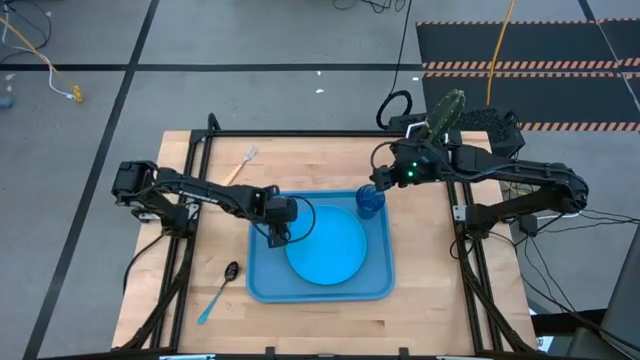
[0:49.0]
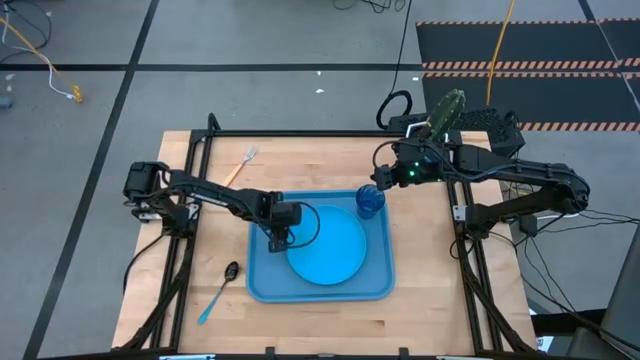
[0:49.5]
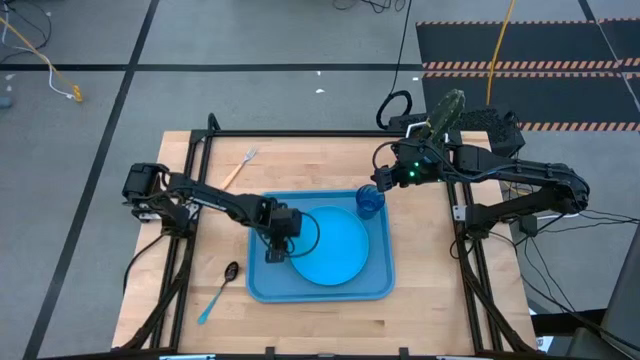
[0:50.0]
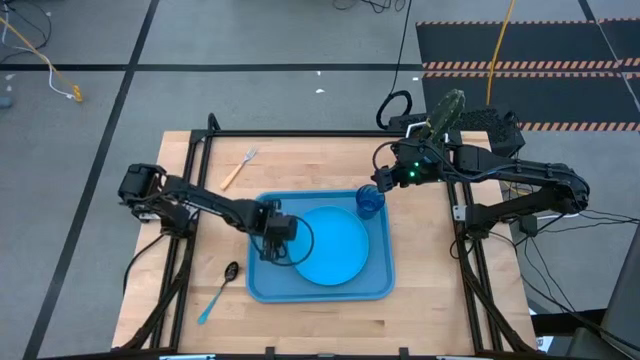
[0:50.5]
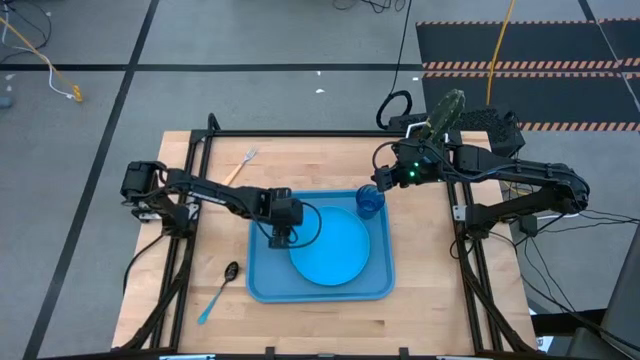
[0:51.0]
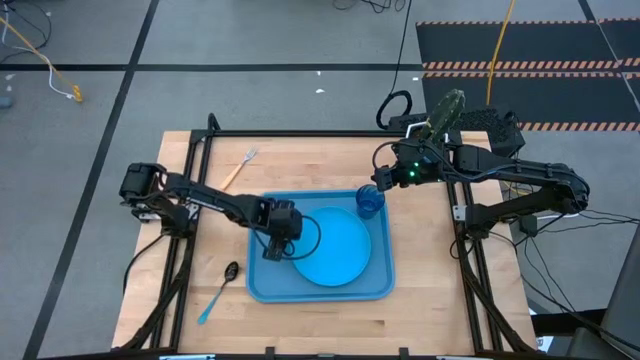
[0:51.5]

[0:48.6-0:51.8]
Task: Pick and place plate/cup/fork/spoon on tray
Adjust the light blue plate

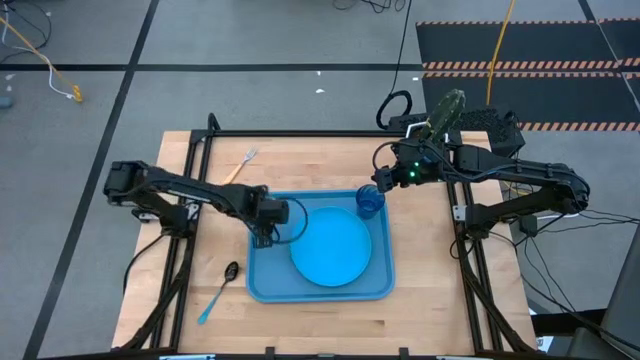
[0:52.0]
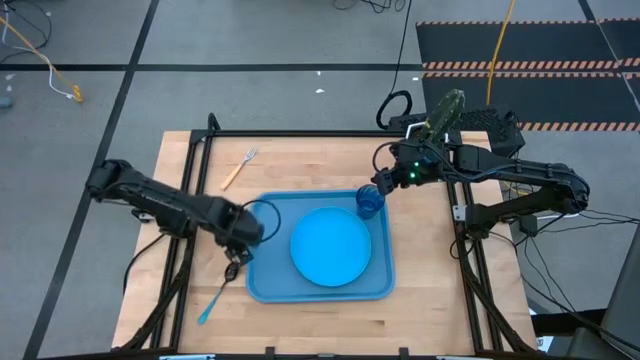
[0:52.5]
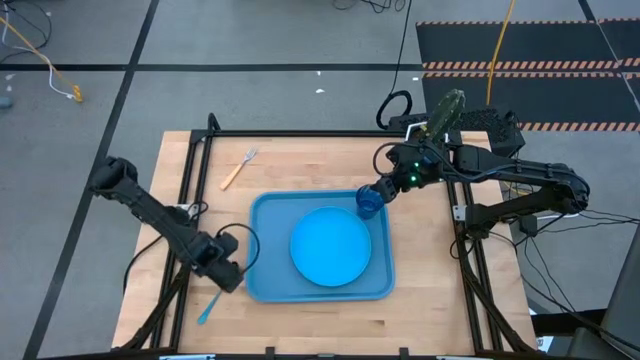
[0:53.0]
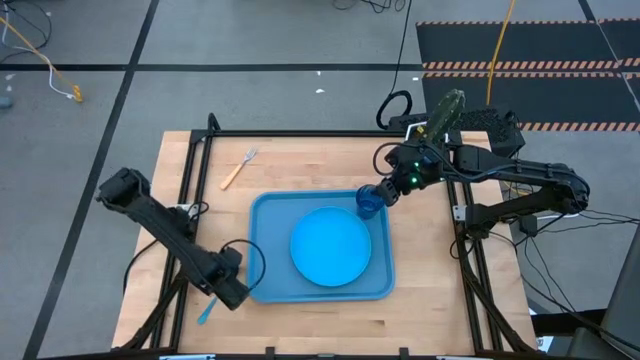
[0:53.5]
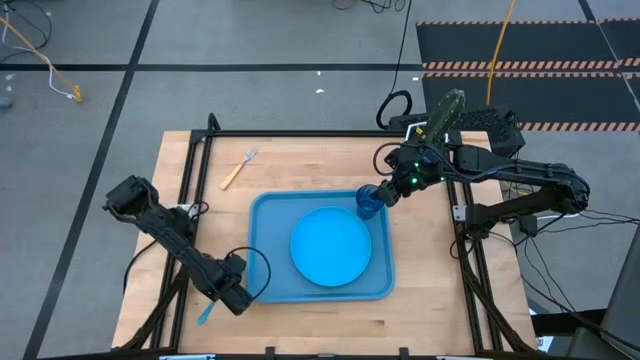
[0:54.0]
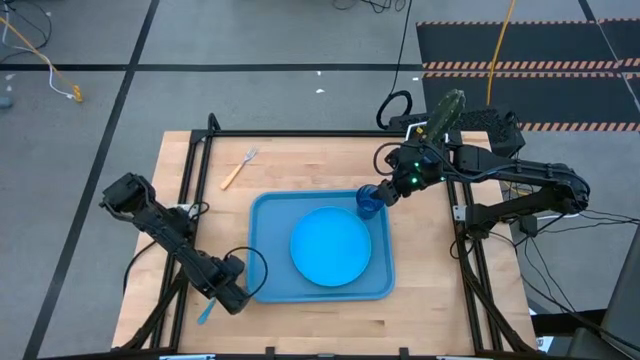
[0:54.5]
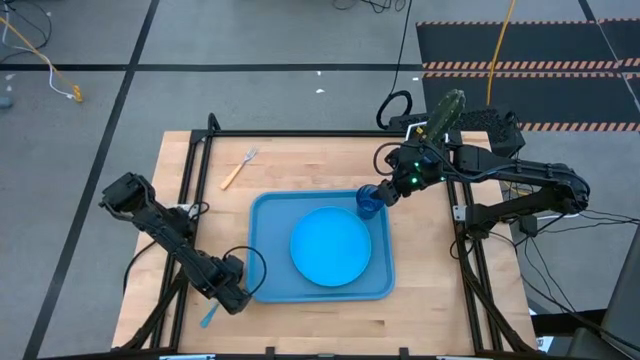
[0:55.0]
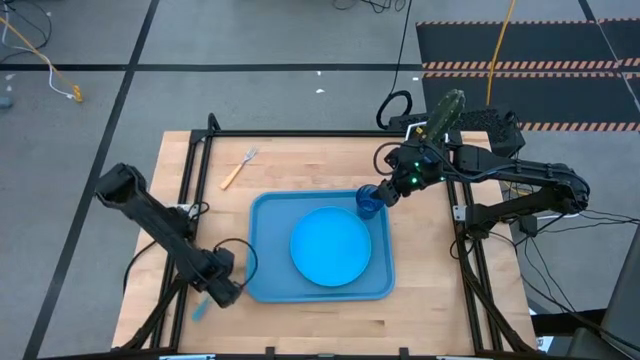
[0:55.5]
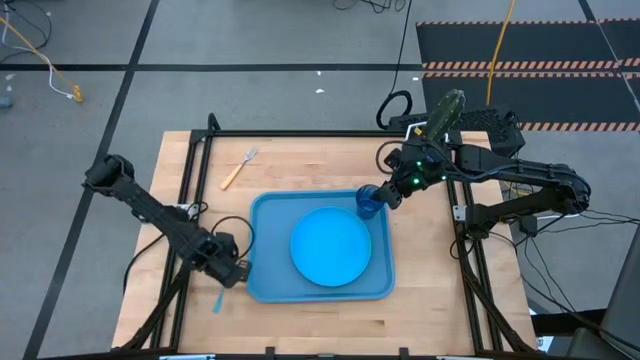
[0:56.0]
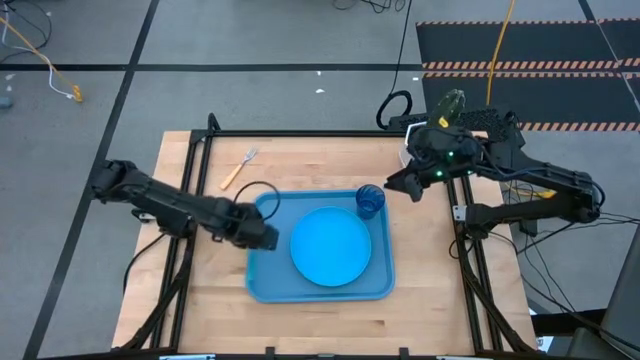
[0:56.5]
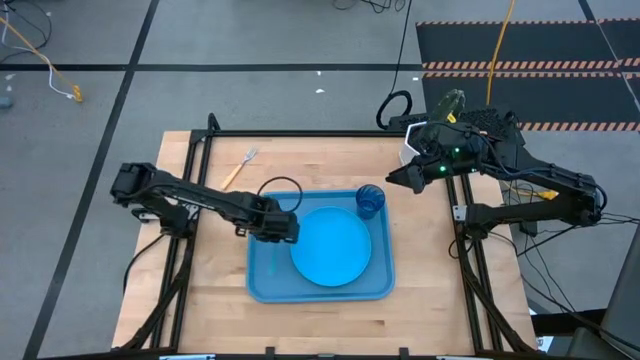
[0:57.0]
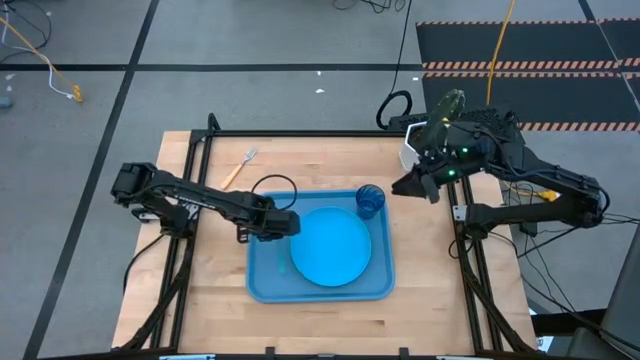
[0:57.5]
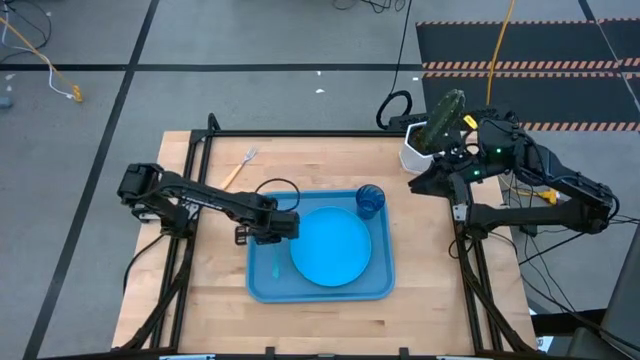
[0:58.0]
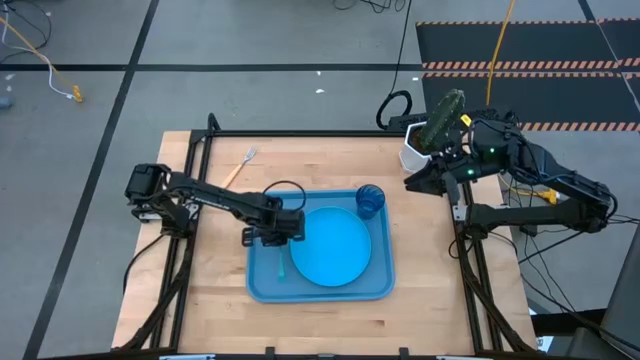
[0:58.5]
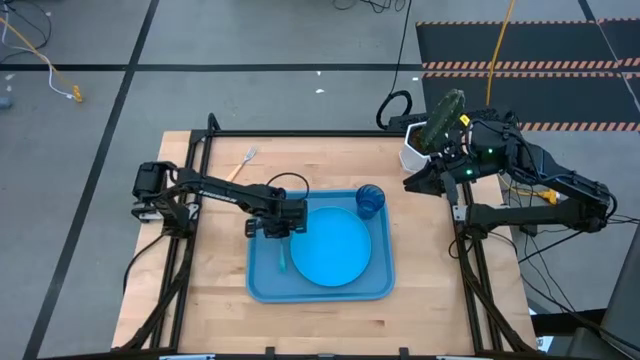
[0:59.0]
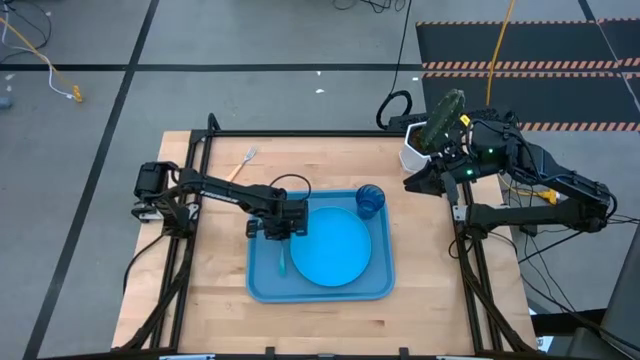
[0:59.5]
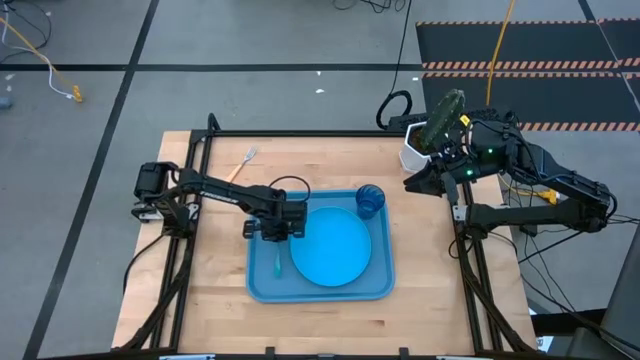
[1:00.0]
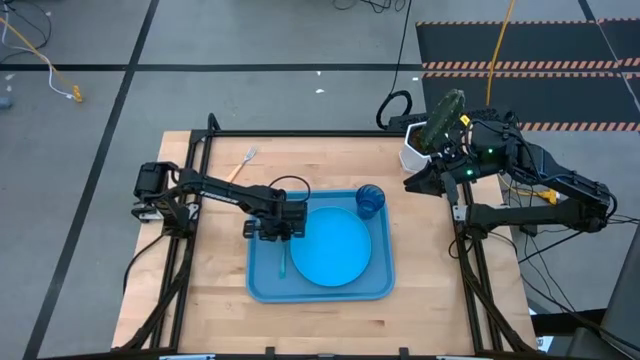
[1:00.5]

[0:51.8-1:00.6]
Put the blue spoon on the blue tray

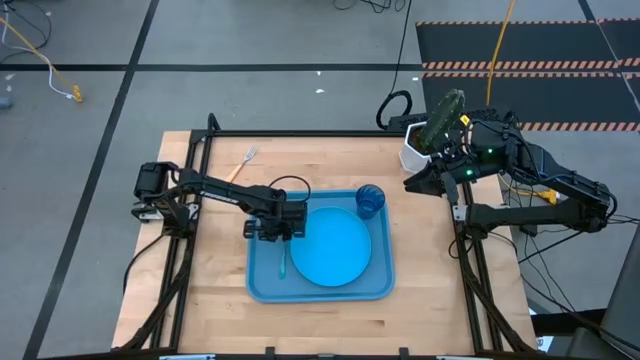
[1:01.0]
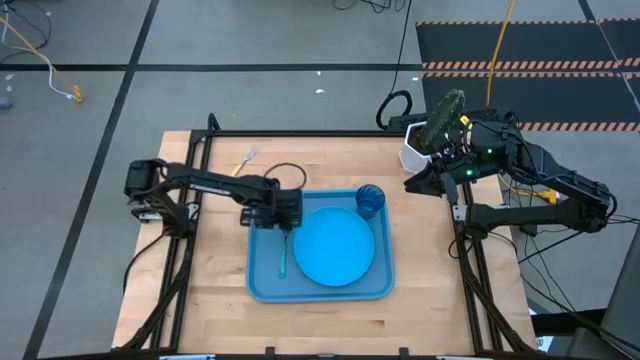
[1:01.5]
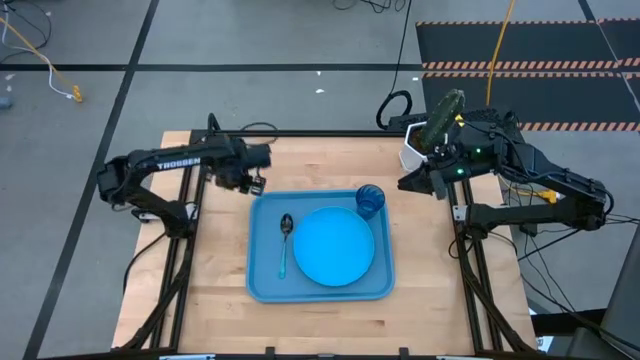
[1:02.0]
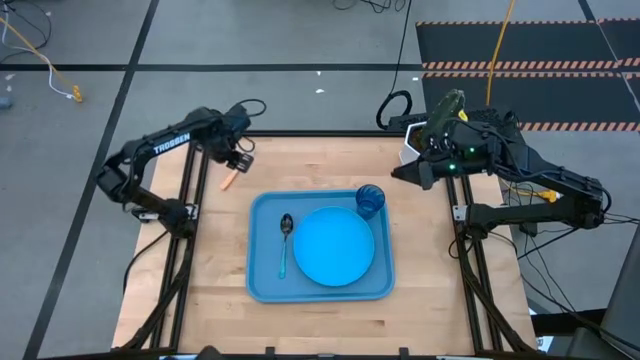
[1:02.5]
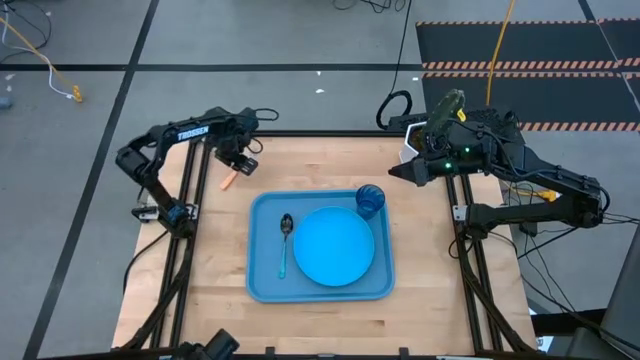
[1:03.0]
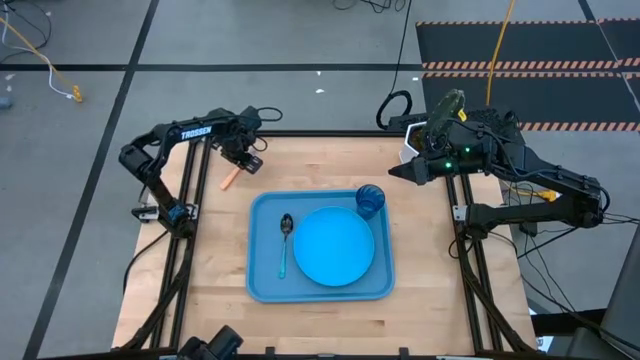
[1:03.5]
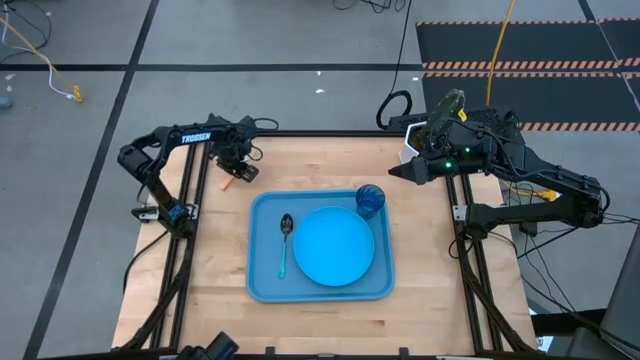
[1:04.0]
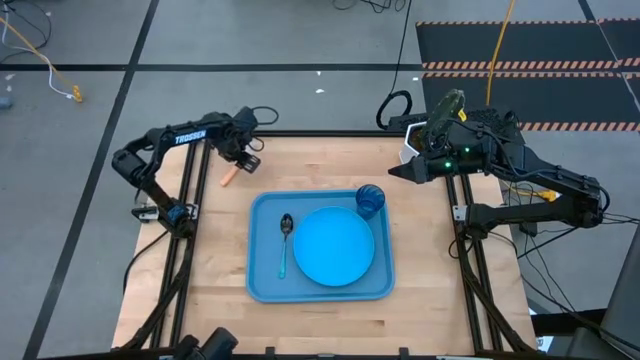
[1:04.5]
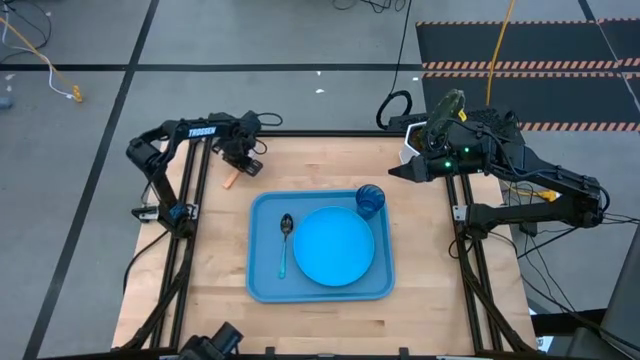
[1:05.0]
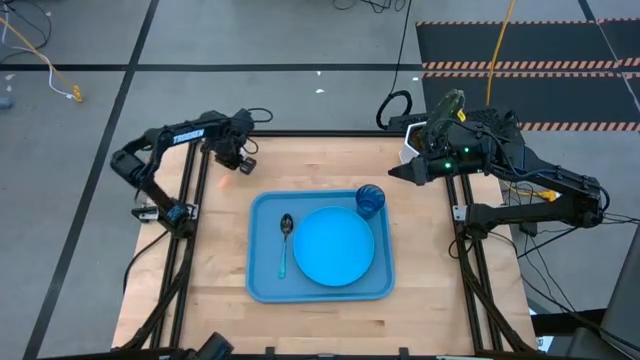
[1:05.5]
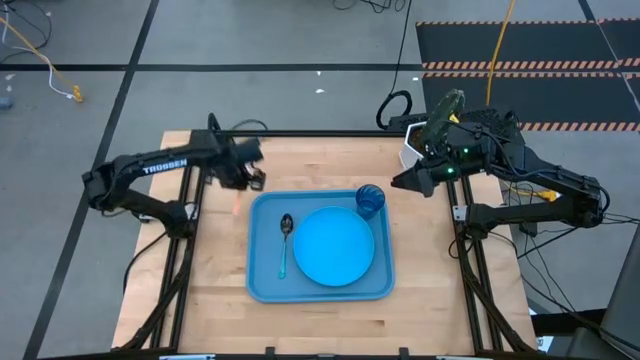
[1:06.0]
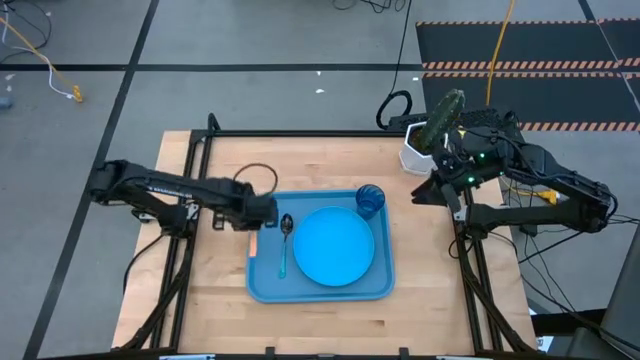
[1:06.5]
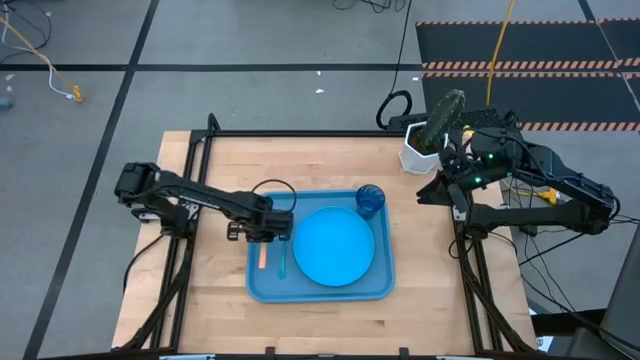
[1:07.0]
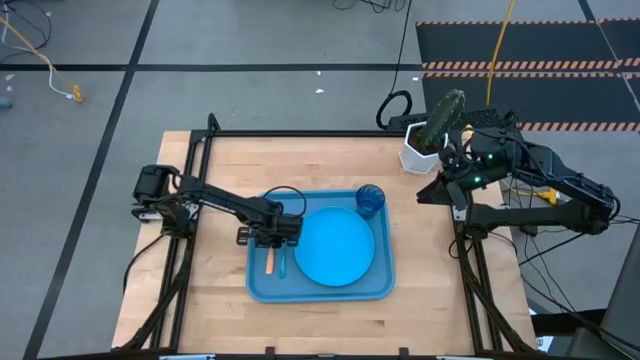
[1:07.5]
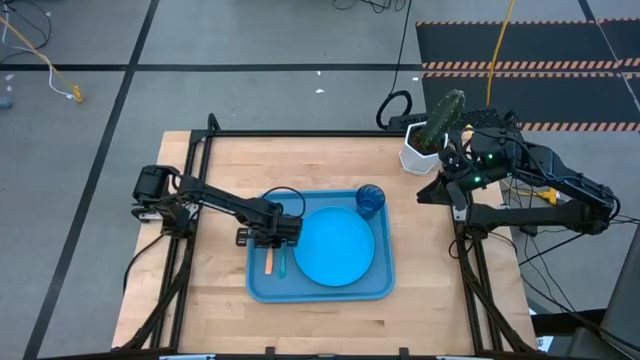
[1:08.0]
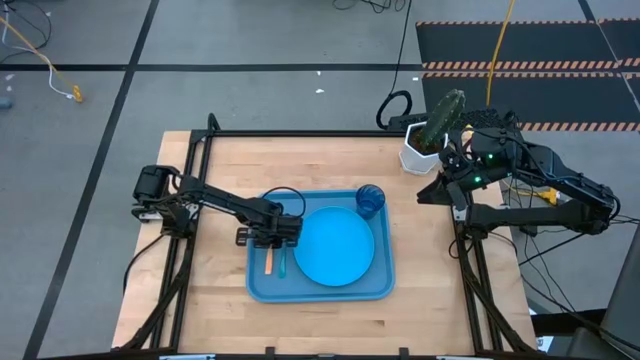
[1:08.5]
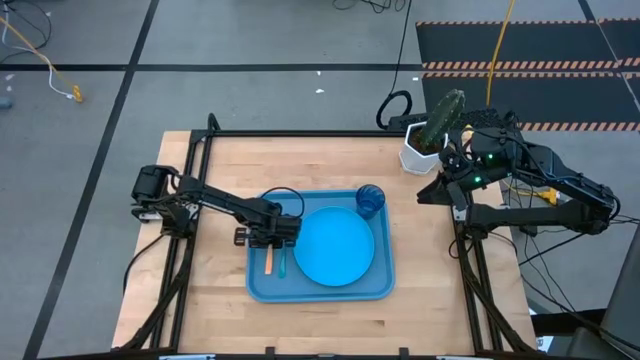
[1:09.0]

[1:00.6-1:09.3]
Put the orange fork on the blue tray
